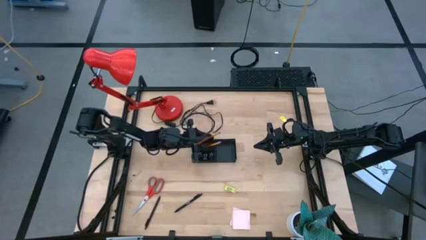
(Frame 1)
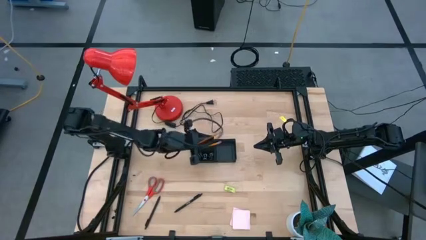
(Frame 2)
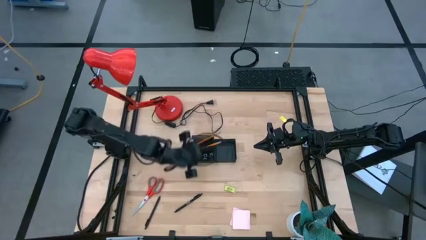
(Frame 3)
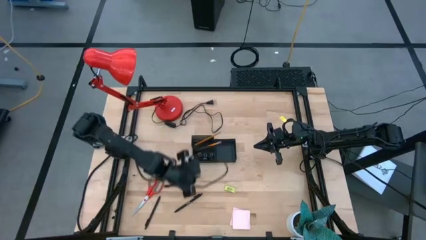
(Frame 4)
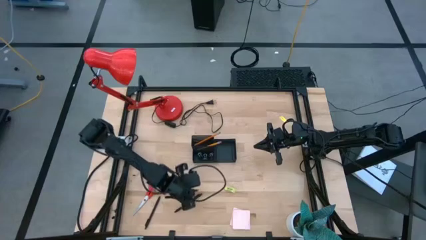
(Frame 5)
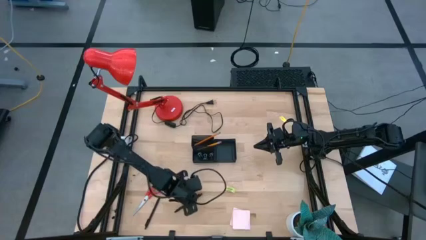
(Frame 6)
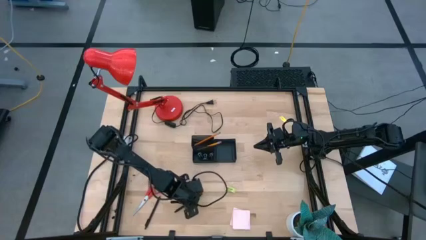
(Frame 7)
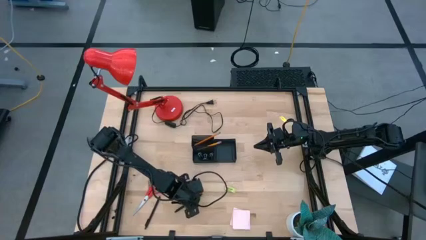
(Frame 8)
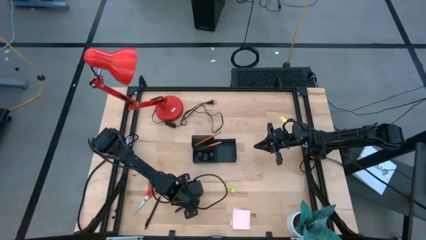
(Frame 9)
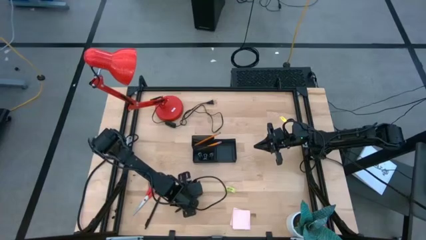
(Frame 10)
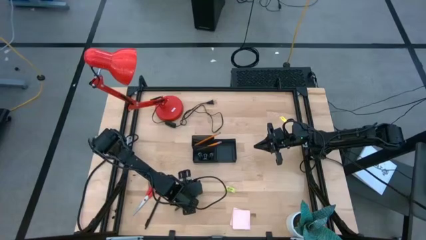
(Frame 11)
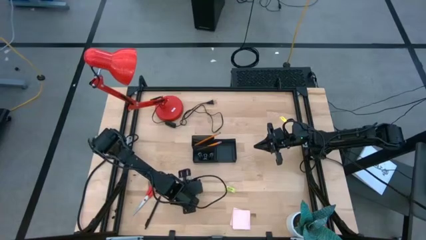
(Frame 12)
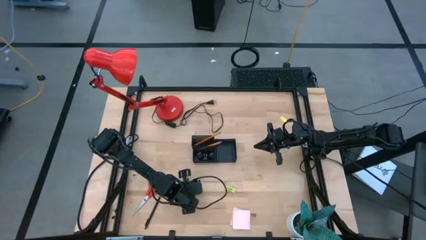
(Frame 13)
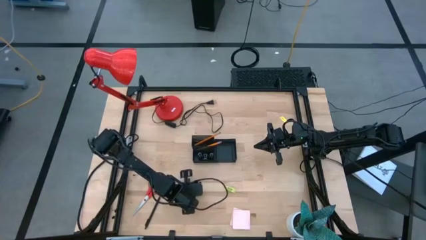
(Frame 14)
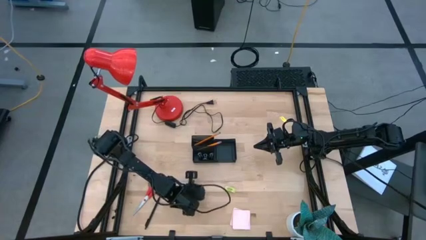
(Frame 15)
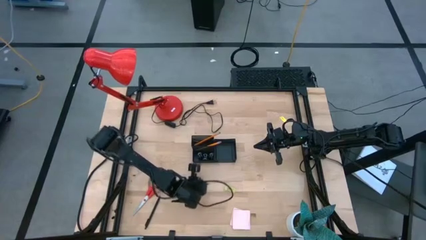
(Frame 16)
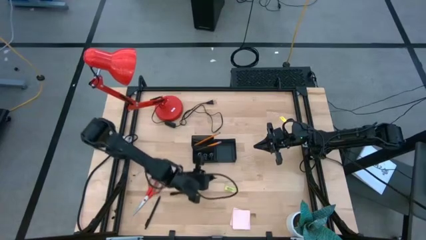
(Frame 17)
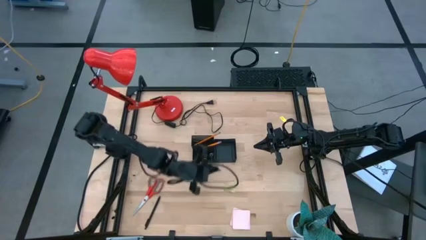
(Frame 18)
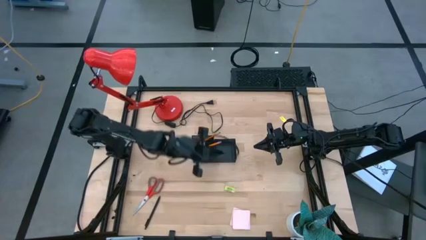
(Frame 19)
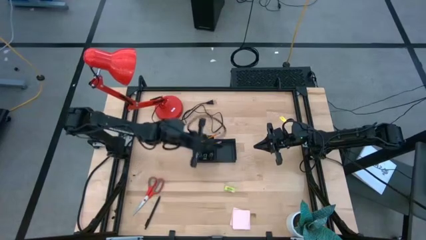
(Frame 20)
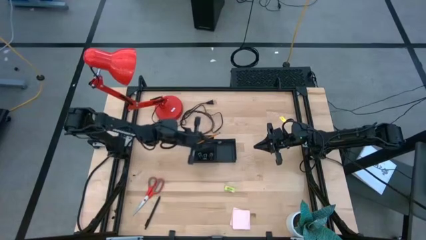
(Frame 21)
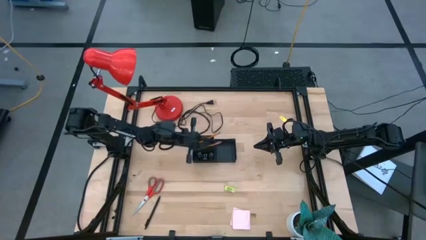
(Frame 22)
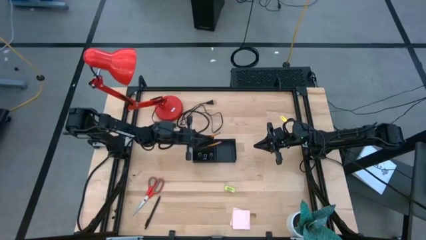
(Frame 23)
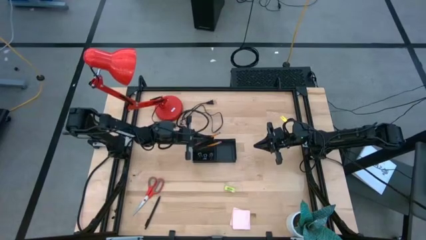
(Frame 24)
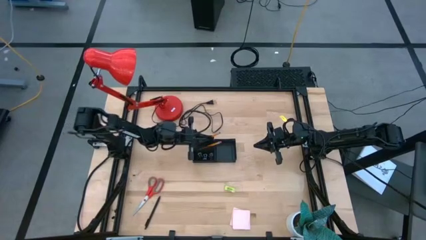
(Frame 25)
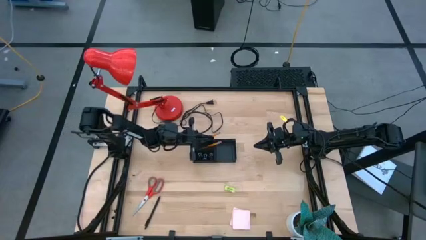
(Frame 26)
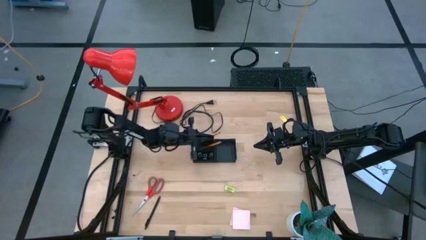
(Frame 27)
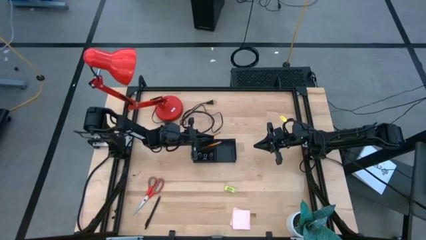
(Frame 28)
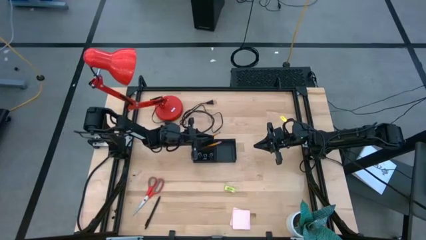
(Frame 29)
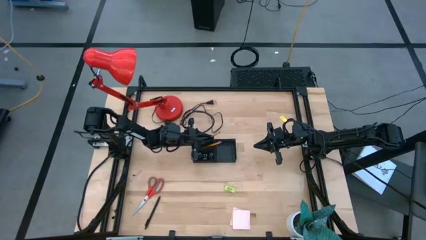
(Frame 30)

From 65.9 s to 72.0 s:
Task: Pick and place office supplies into organizer
Put the black pen into the desk organizer

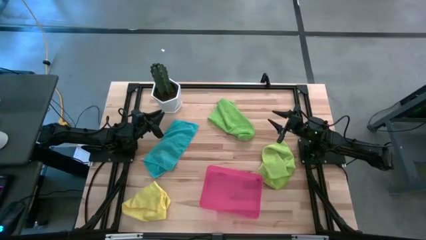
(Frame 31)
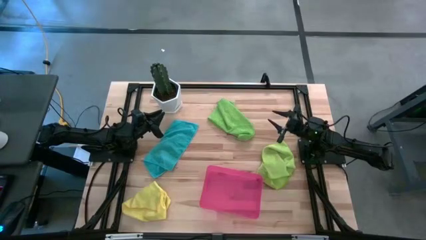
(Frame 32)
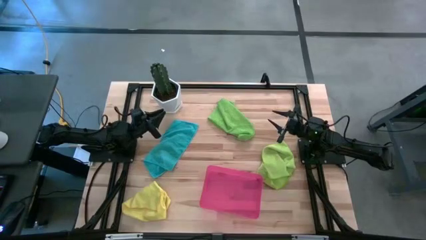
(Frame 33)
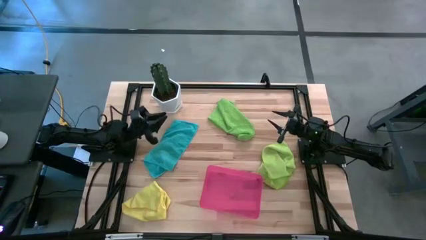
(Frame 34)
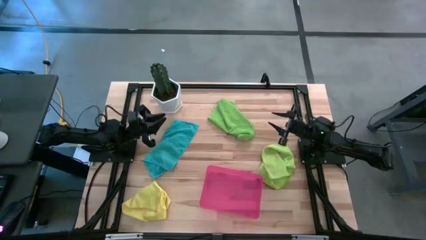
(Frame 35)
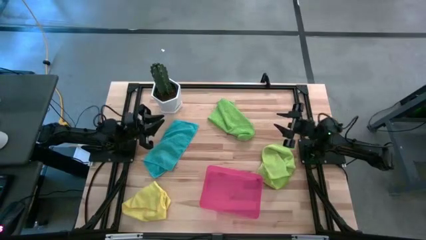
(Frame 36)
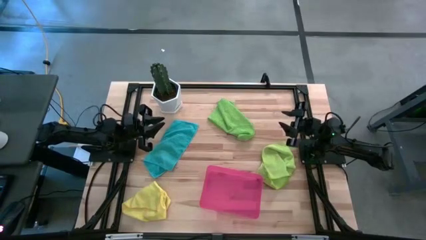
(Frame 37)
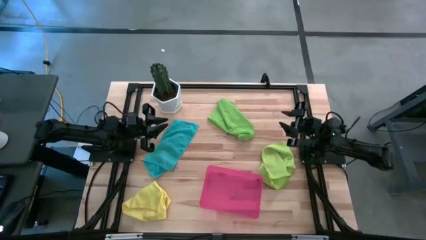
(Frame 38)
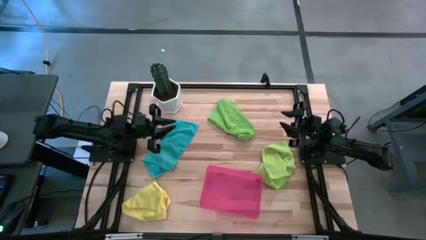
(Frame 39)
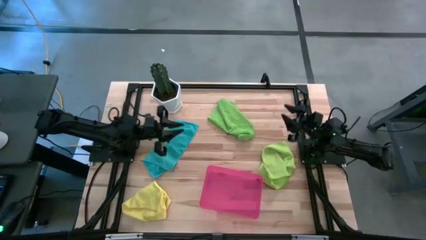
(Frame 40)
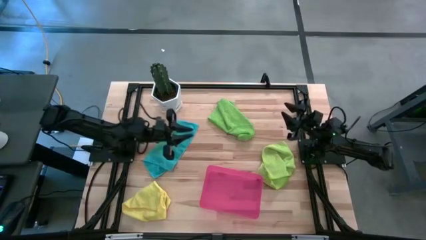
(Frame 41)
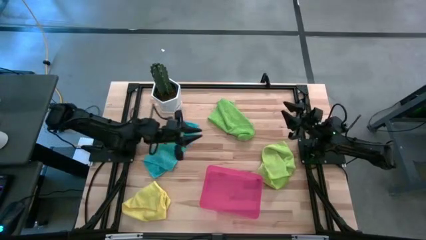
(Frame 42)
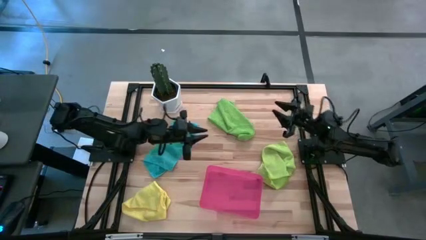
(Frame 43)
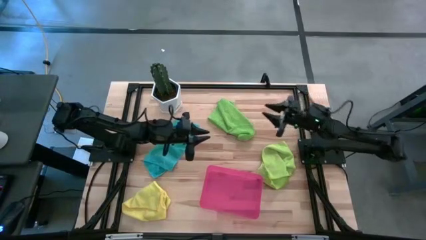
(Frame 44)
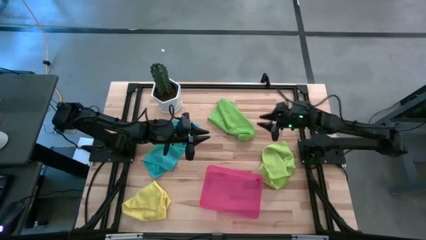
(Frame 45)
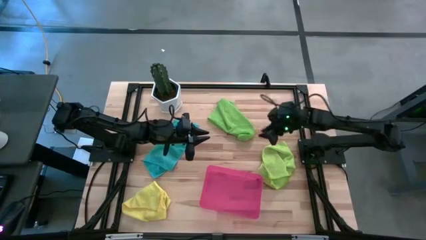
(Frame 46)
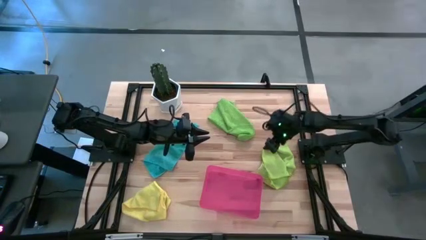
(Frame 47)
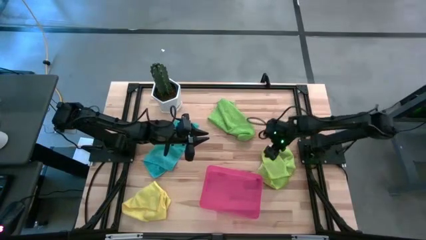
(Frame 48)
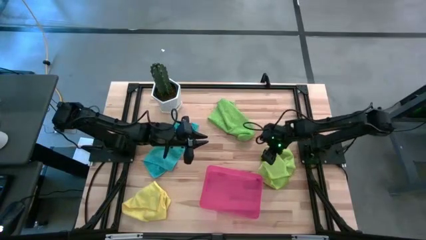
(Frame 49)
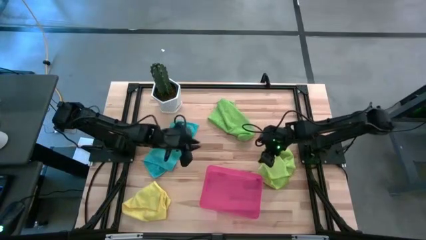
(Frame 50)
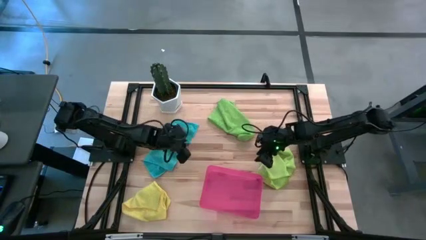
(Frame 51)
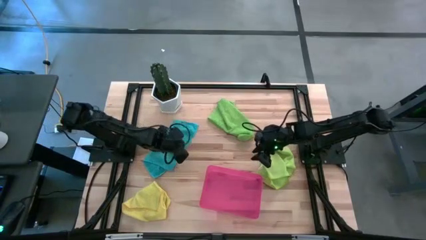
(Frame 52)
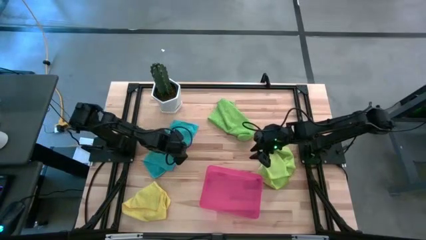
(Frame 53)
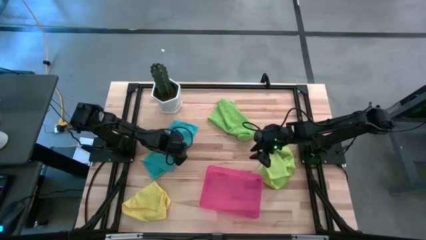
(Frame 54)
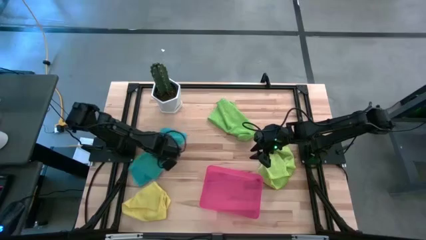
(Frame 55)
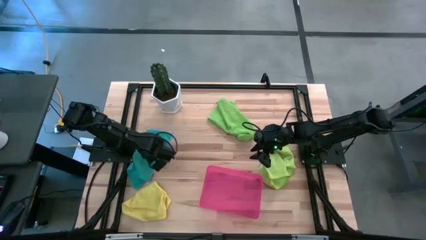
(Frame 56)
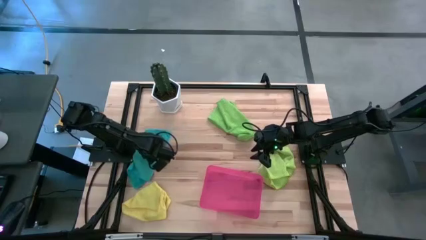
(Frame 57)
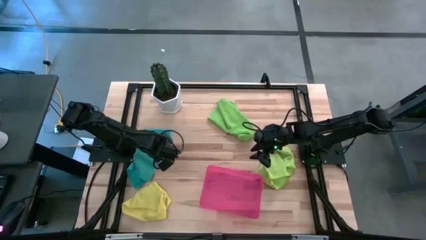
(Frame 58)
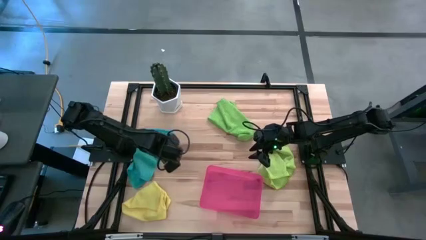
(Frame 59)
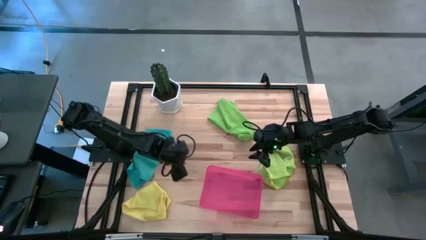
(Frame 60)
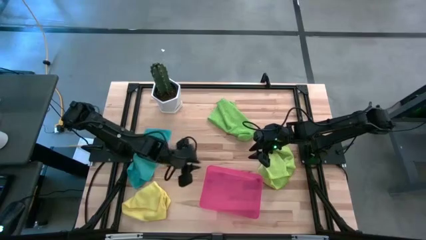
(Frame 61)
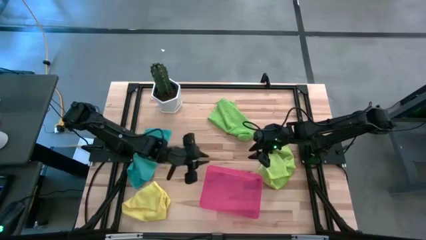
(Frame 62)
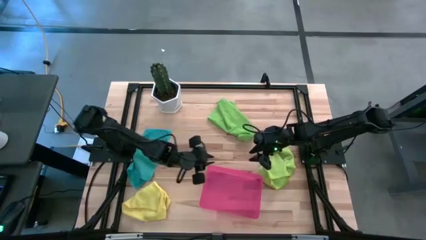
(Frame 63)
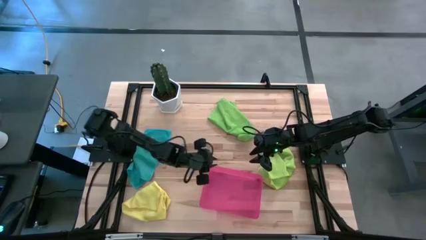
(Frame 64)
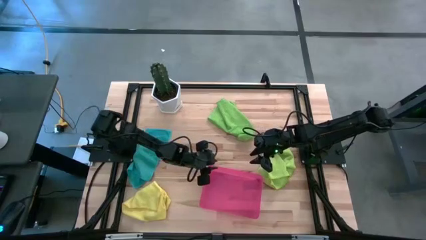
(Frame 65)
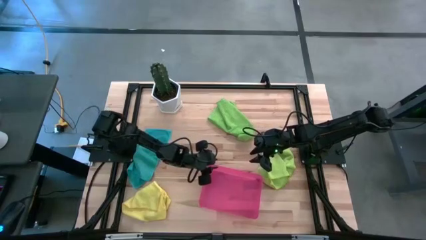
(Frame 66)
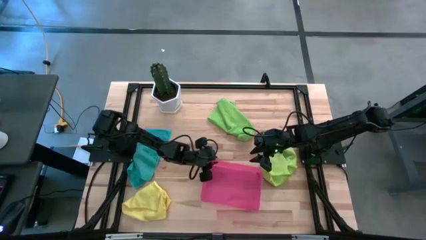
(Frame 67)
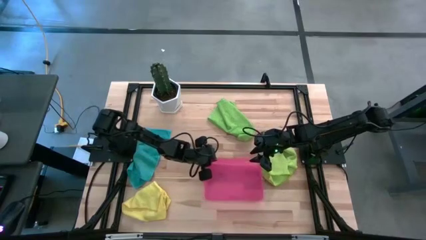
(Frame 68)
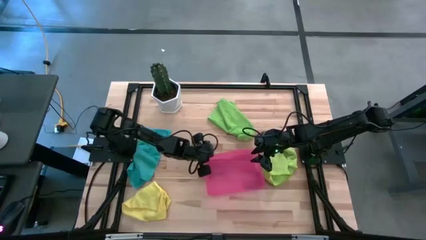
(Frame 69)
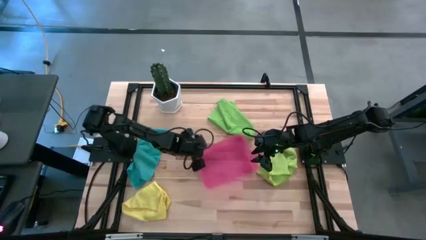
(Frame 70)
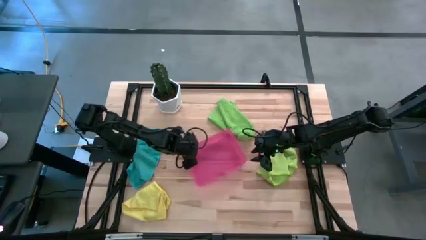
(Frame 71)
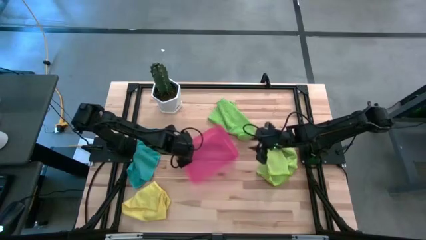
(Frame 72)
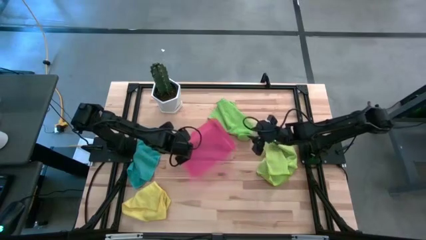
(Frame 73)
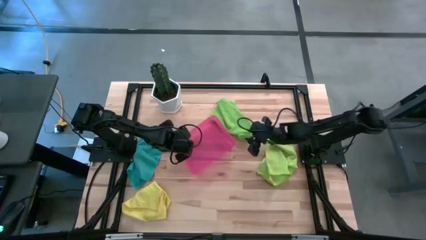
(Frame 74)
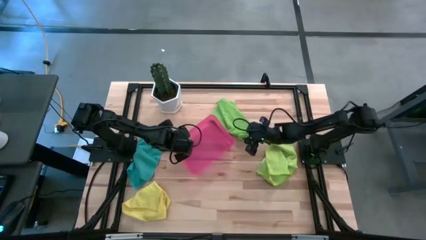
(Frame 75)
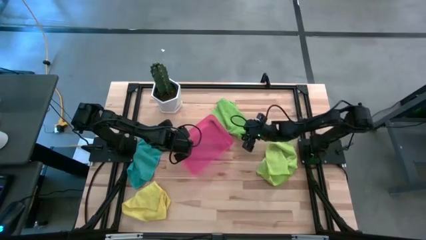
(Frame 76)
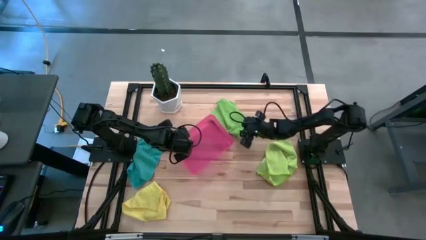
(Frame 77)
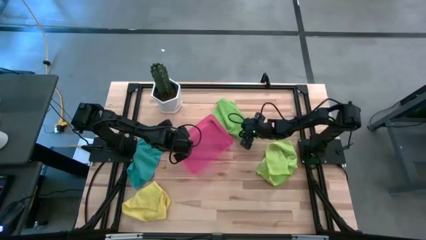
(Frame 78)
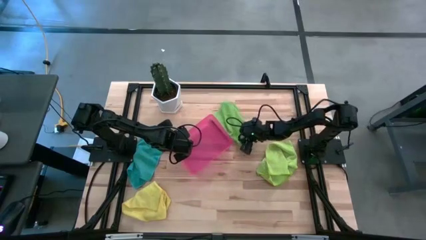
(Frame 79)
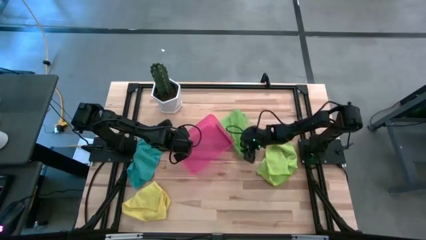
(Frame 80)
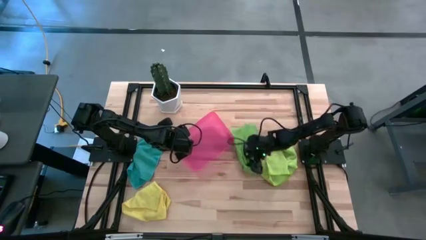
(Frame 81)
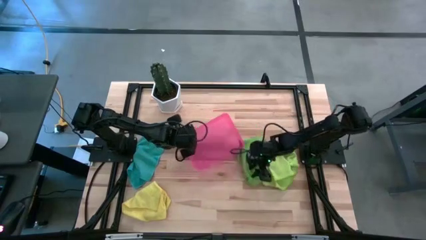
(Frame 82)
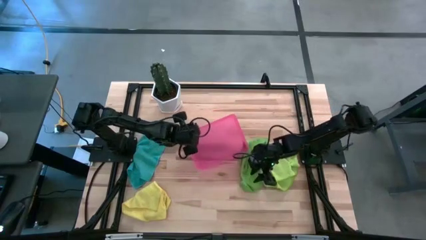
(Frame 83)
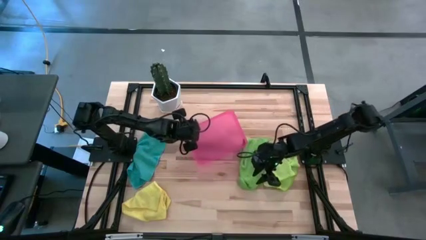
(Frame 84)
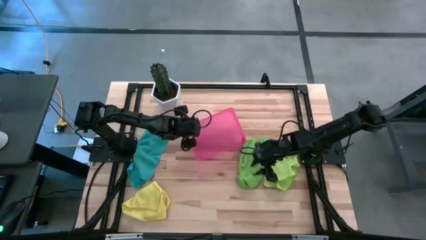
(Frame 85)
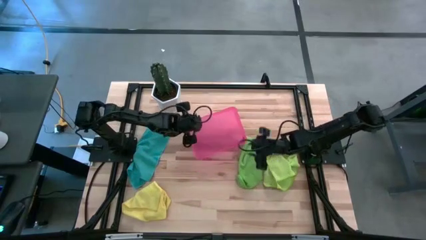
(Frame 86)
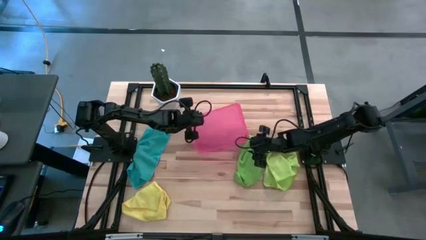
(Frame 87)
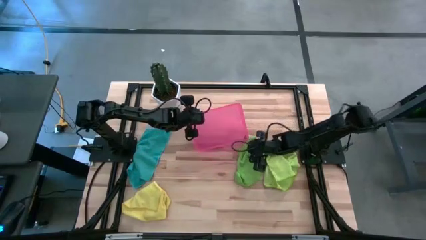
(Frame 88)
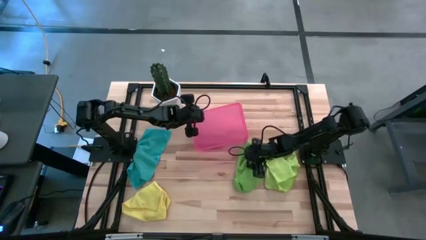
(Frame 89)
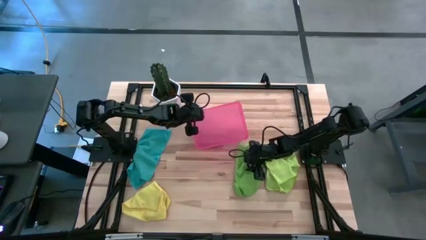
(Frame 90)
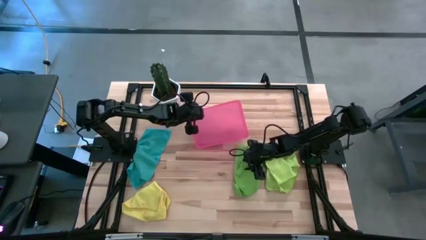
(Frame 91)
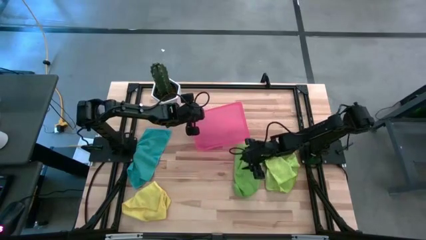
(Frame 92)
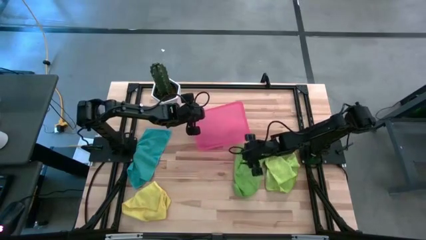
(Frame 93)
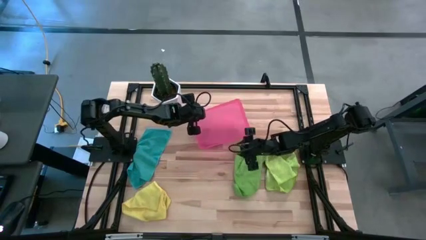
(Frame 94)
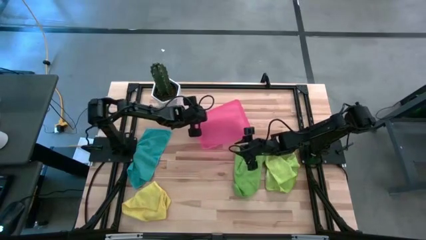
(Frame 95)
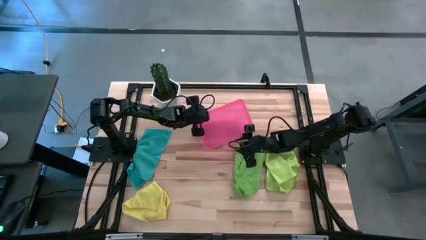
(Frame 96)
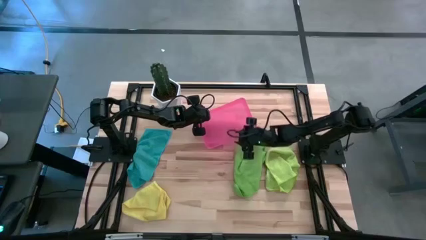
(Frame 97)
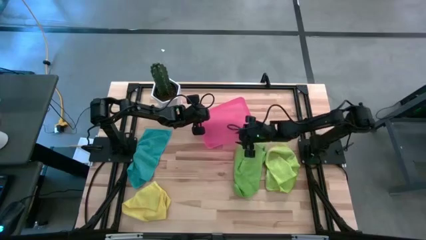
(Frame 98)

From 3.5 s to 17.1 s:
Task: Roll microfiber towels into tight, uniform cylinder then place into a basket
Move the pink bin to the top center of the table
